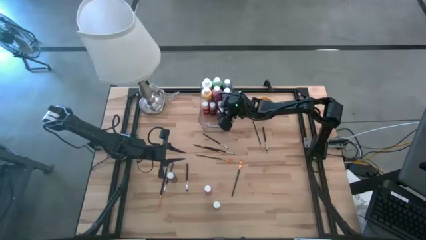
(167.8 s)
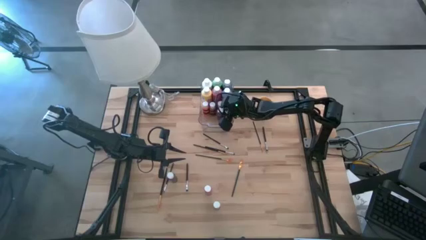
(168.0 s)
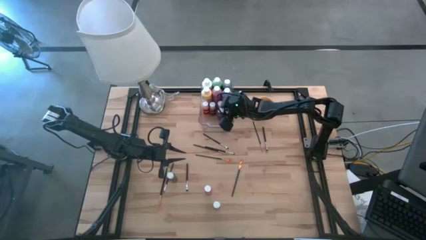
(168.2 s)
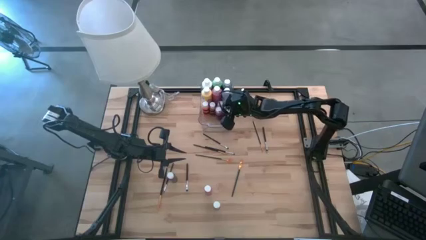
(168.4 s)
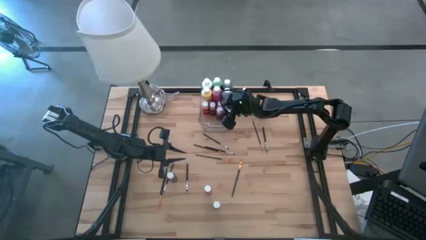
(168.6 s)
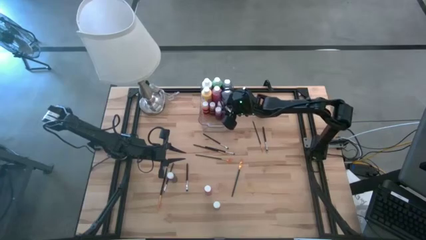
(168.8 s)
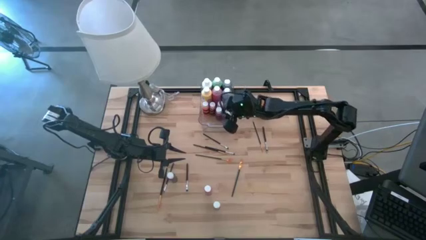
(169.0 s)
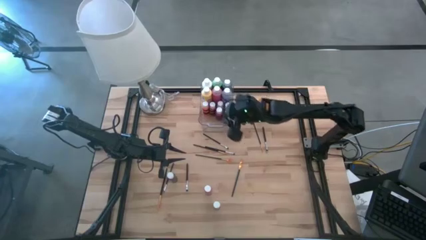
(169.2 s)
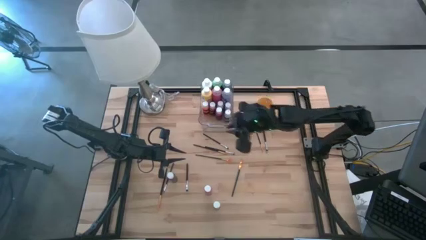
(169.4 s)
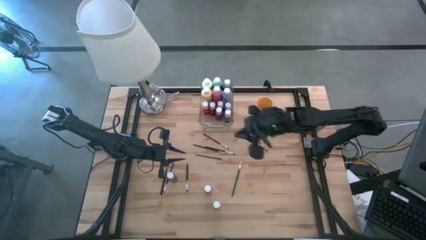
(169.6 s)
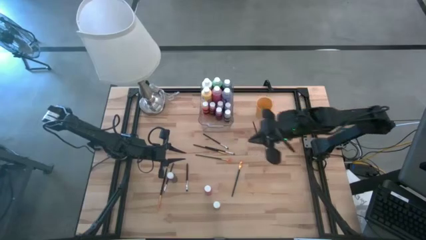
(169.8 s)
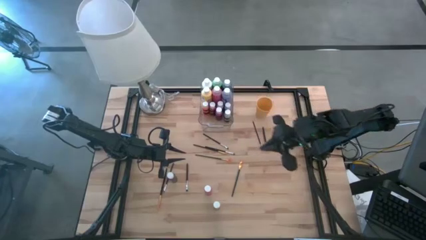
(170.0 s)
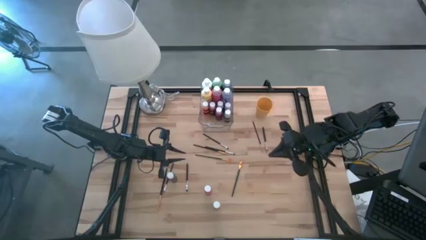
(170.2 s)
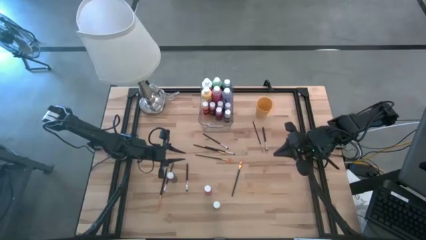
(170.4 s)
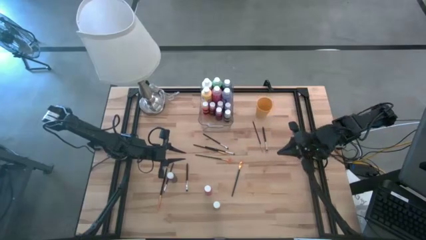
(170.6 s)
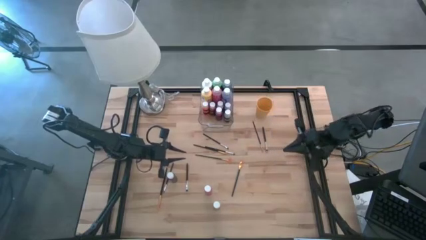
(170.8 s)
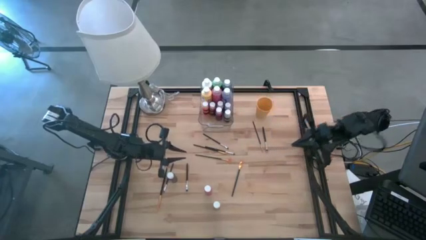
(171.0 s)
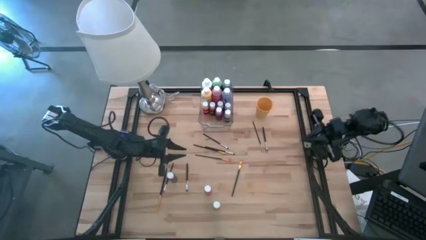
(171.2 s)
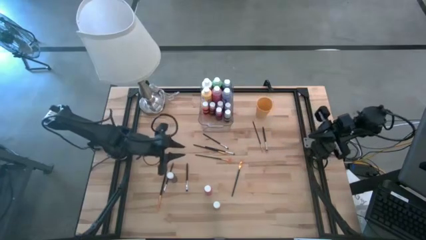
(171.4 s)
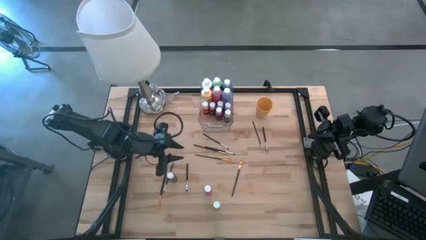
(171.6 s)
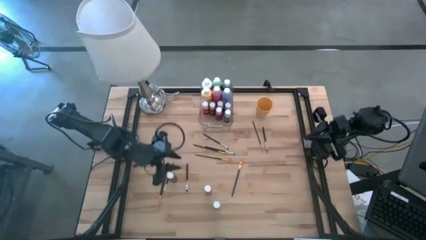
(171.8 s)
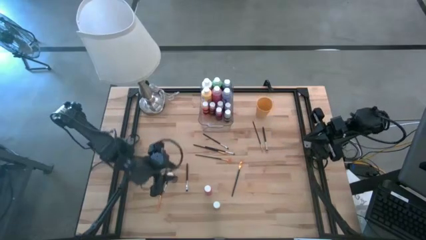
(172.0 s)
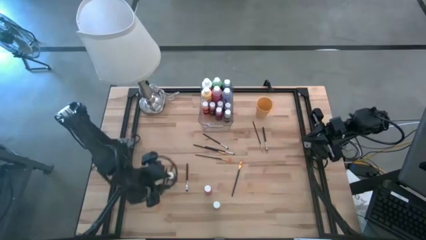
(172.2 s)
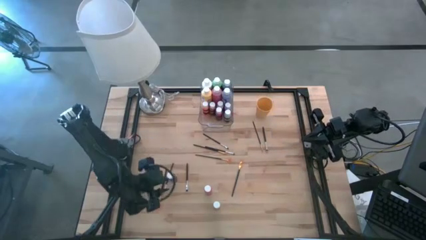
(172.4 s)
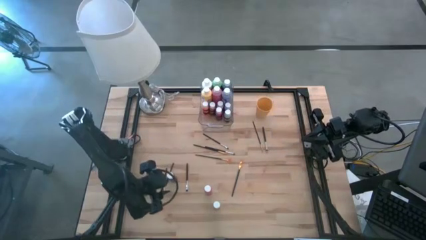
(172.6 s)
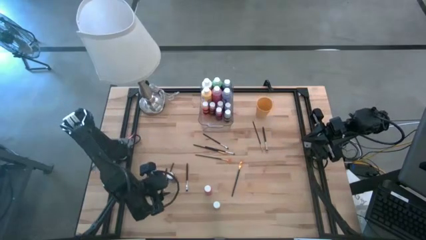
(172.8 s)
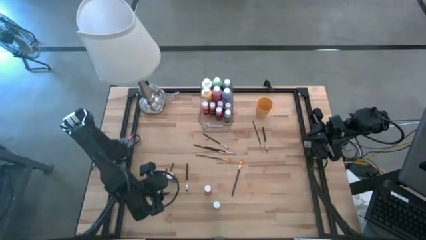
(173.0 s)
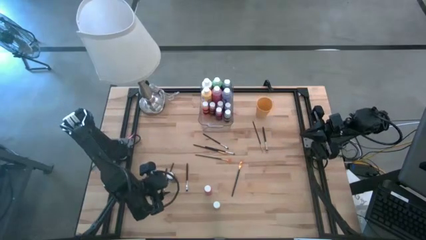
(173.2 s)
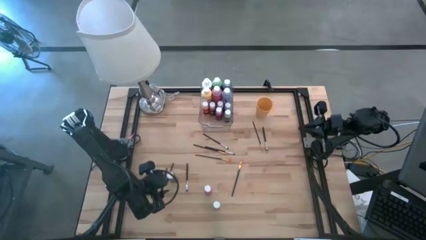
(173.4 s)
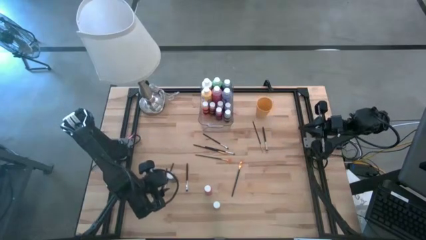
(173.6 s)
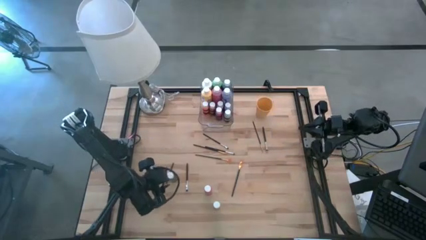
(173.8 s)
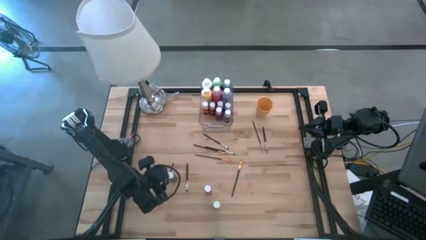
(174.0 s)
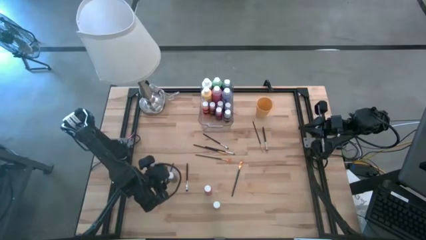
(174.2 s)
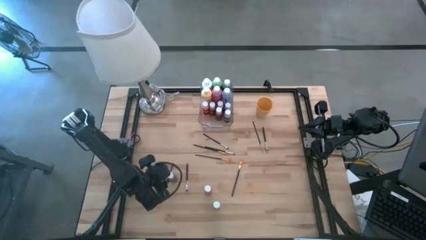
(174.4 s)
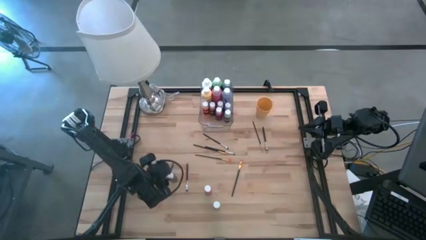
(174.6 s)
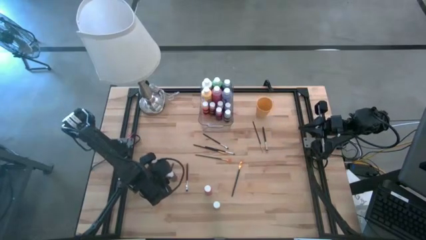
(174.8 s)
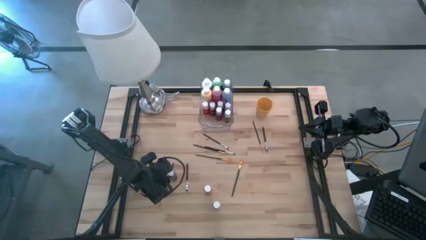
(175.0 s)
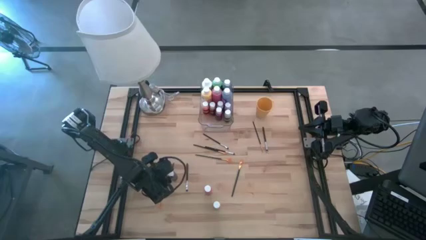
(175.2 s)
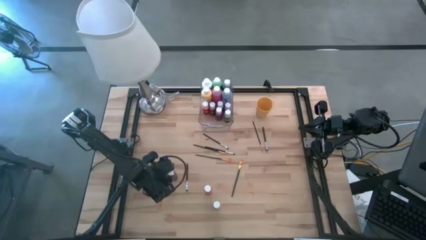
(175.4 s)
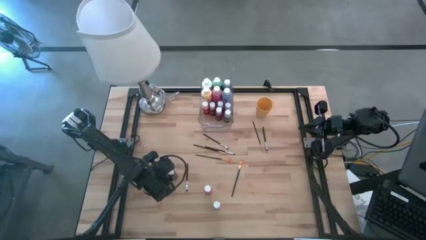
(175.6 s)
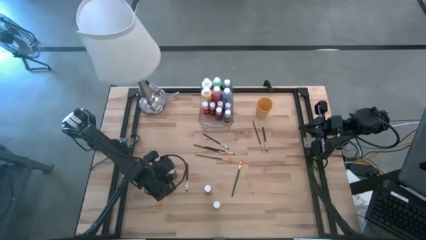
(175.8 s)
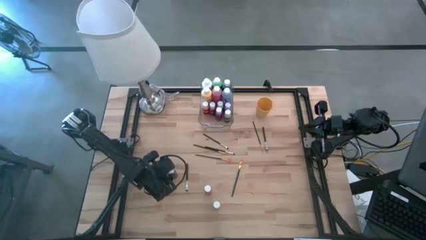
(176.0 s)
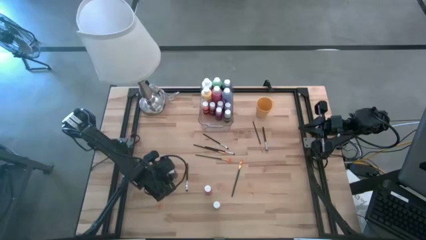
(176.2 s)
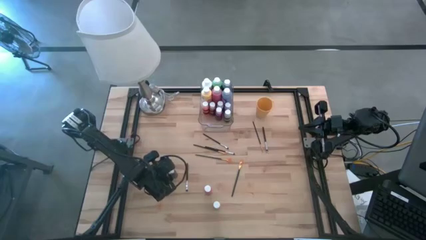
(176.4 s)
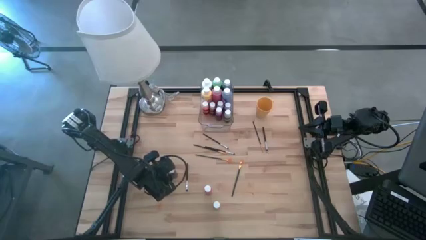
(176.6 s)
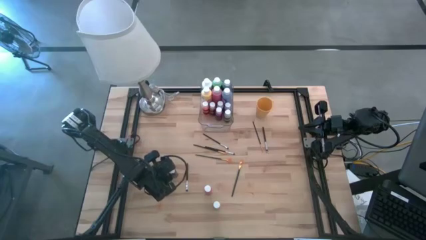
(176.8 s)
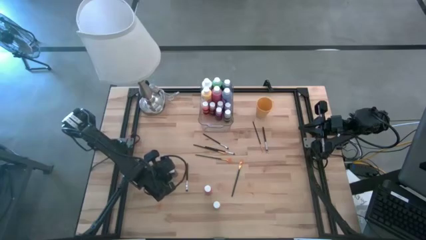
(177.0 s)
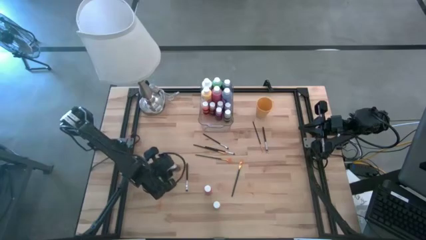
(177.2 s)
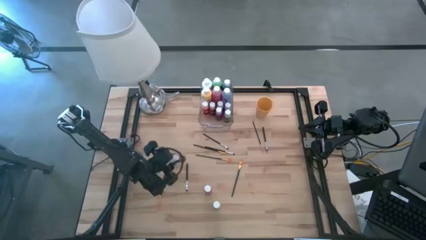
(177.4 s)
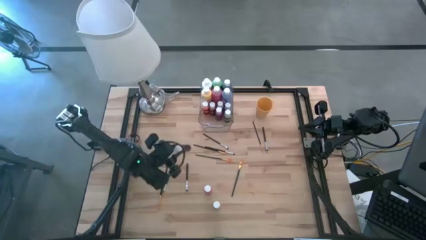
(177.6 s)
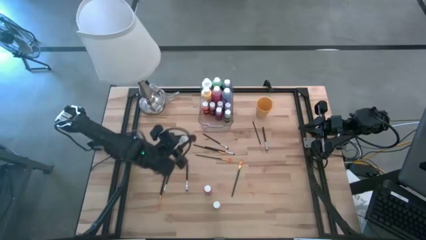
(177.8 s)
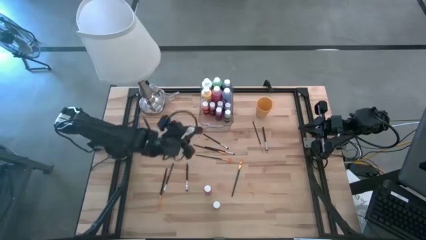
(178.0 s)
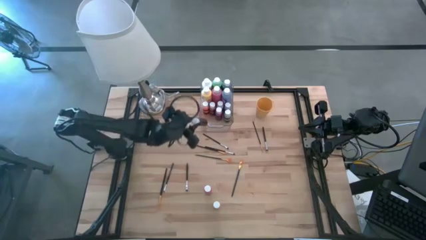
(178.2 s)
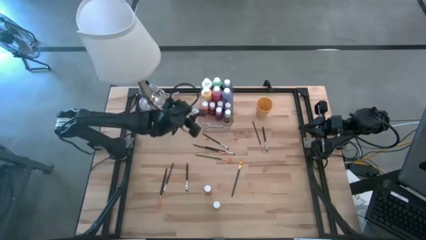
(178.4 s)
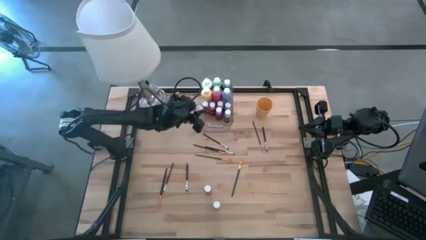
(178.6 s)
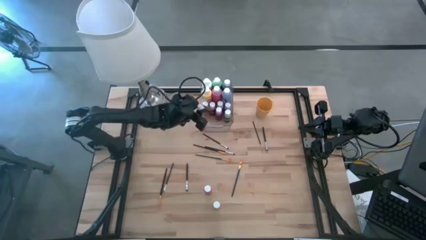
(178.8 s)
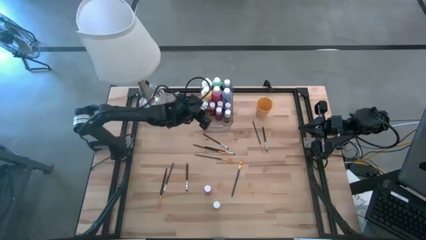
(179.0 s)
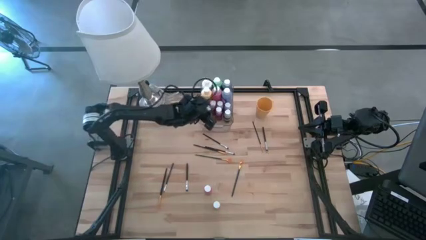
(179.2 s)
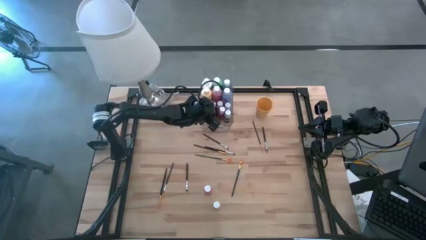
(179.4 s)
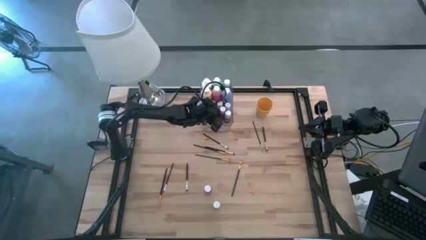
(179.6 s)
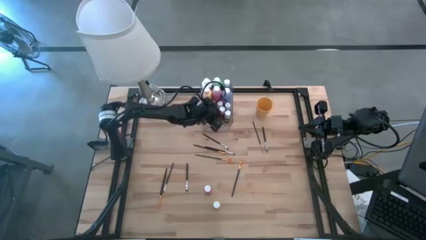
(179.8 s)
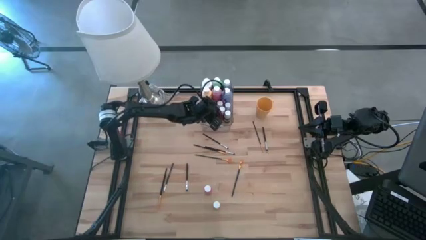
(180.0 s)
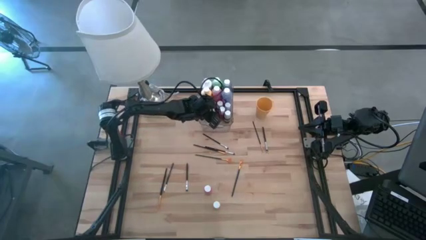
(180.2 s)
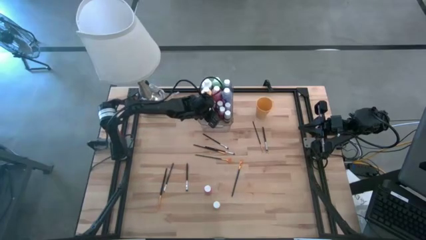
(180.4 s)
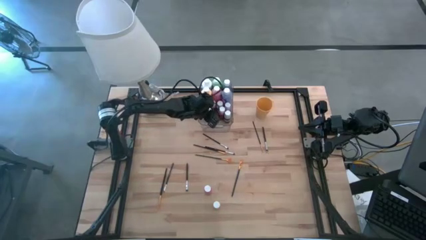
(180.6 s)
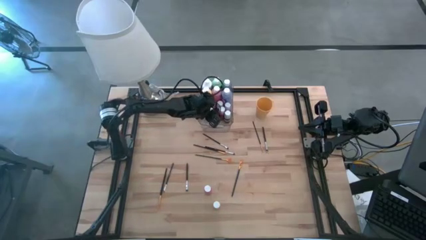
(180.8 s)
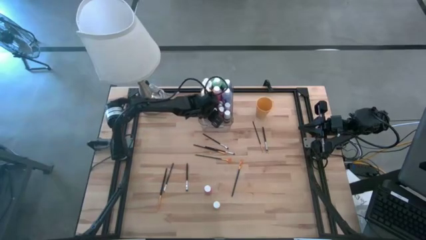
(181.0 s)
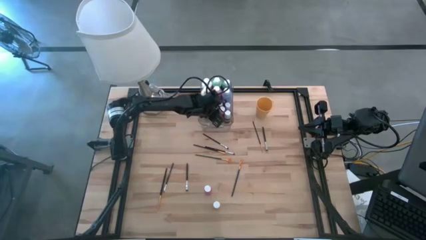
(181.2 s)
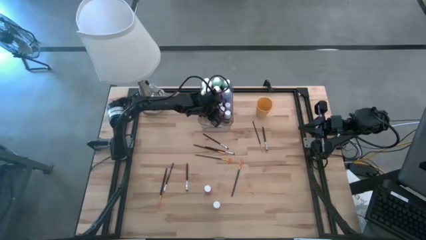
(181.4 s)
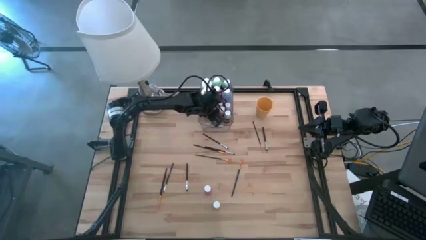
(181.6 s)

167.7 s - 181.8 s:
Task: Pick & Place Paint Supplies
Put the small black paint bottle into the bin

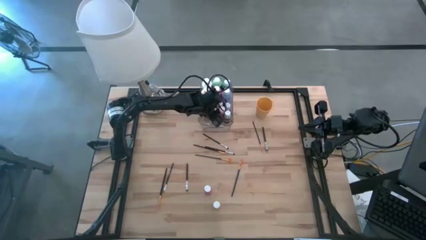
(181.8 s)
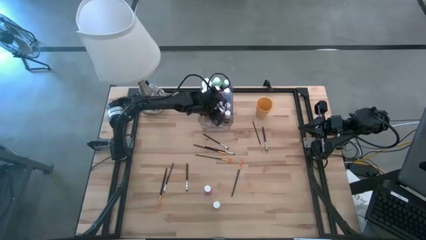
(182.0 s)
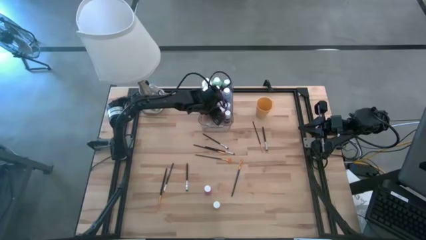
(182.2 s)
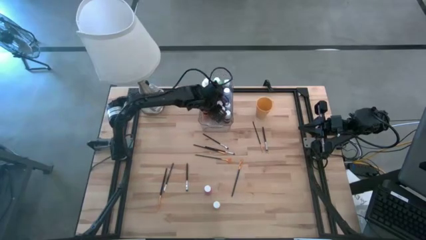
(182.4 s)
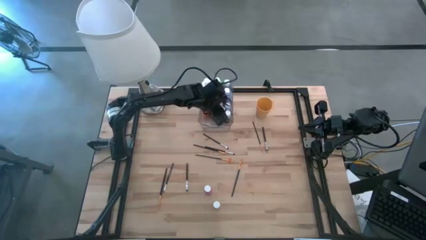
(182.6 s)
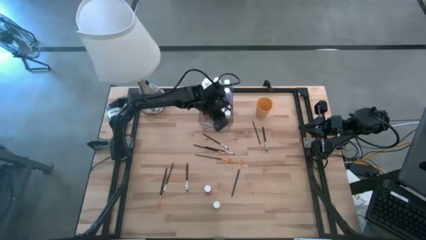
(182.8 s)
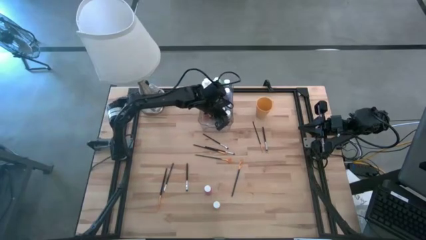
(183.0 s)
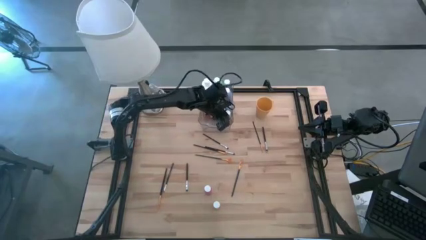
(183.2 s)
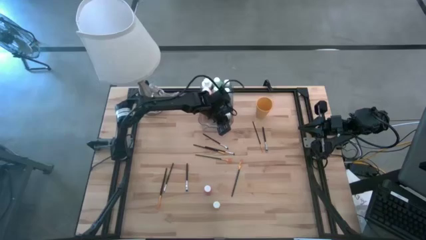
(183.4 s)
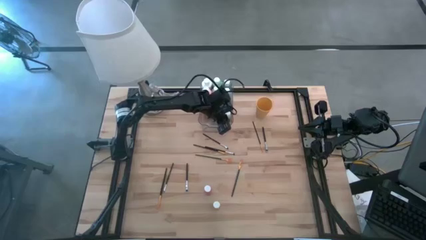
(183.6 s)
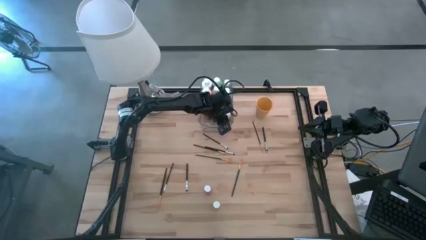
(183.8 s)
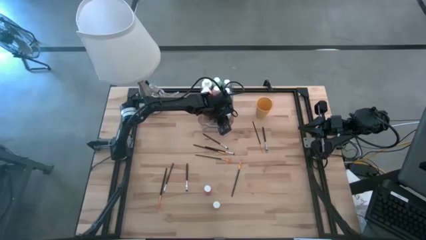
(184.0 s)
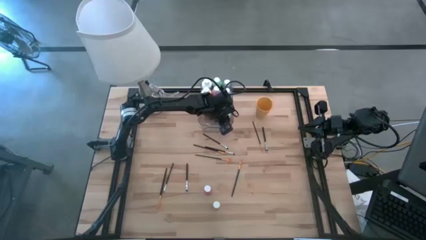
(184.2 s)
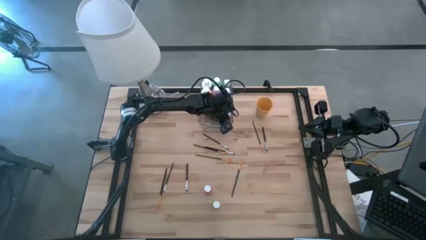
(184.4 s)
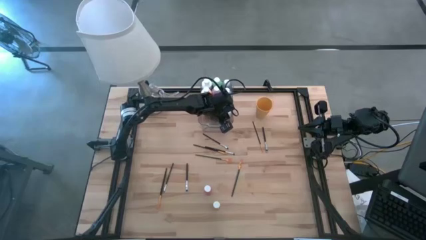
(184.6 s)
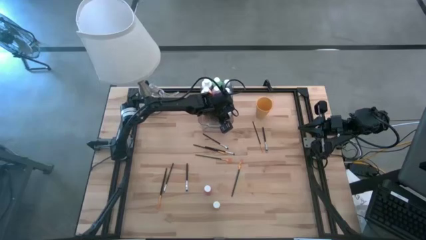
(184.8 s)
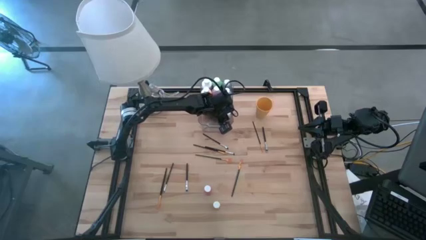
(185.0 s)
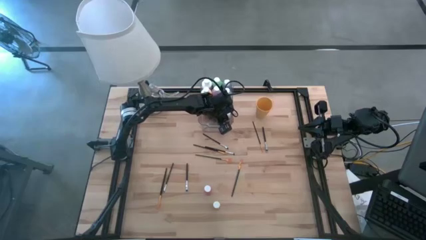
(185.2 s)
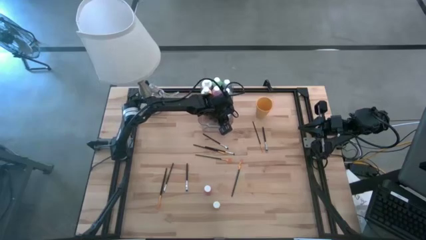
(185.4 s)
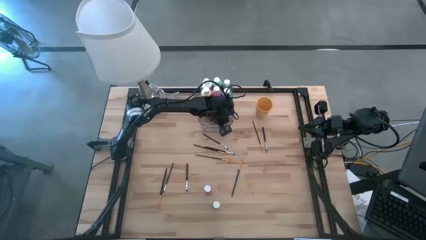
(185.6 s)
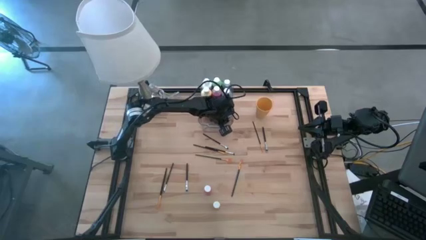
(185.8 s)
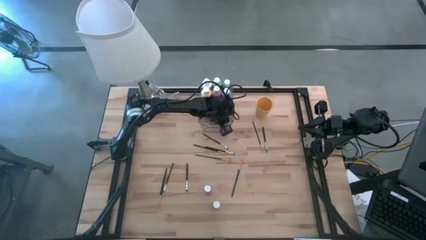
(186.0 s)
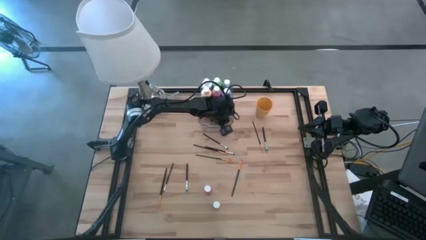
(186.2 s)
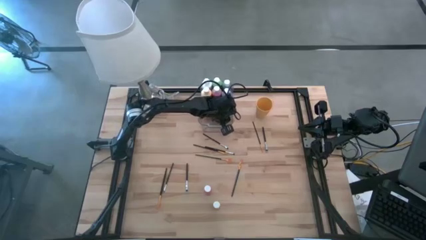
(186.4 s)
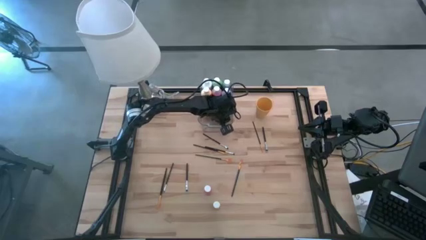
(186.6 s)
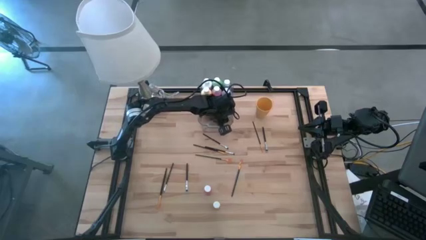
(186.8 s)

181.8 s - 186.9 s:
Adjust the small gray paint bottle in the bin
